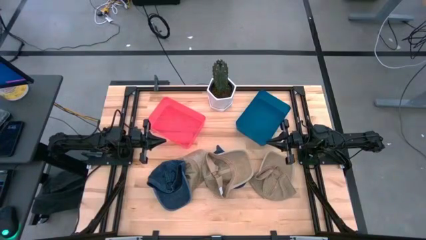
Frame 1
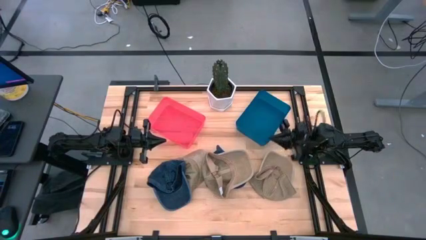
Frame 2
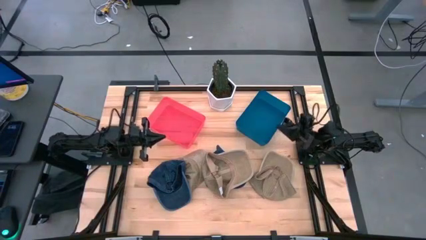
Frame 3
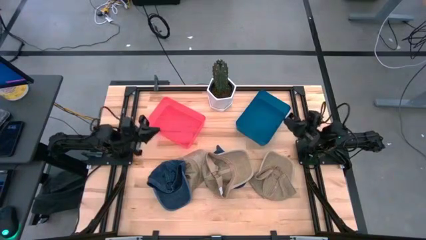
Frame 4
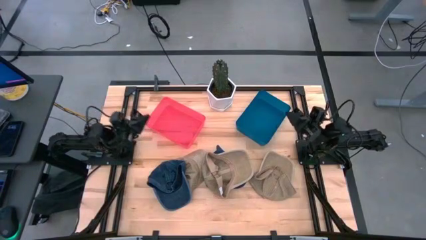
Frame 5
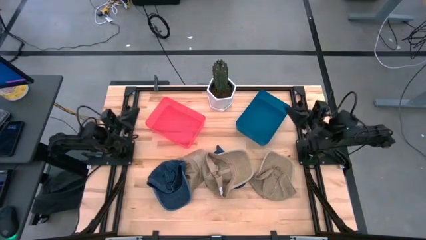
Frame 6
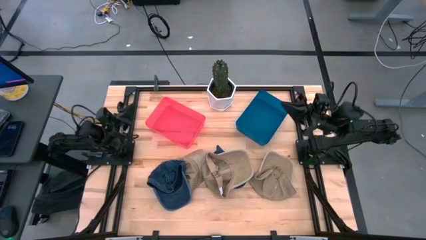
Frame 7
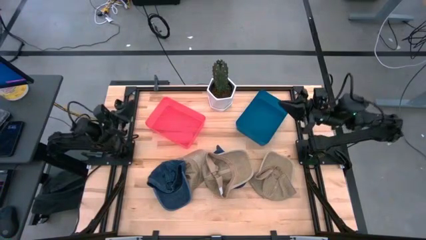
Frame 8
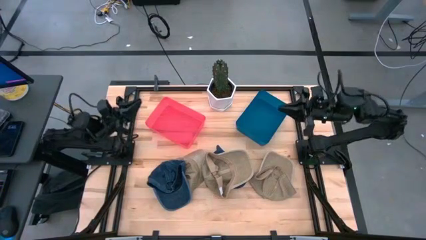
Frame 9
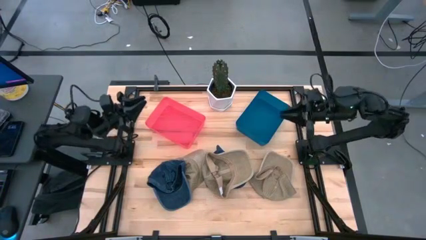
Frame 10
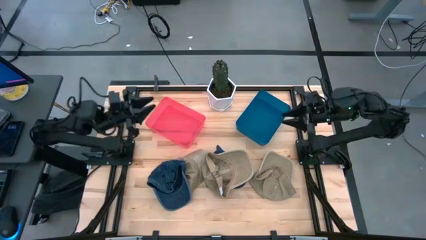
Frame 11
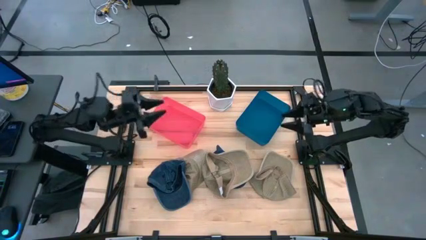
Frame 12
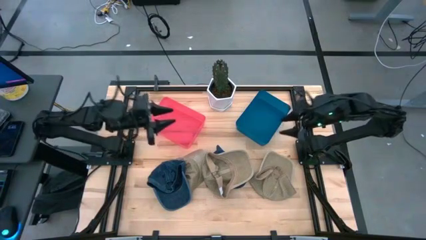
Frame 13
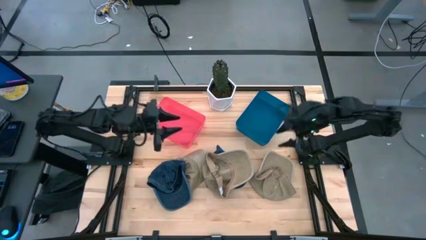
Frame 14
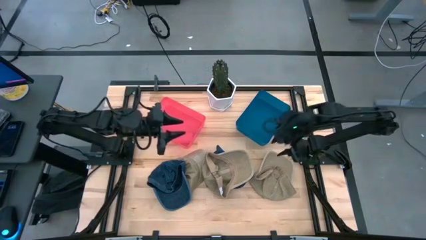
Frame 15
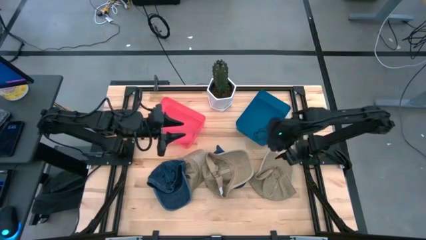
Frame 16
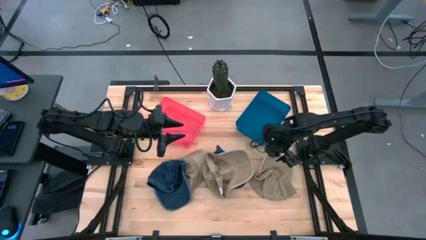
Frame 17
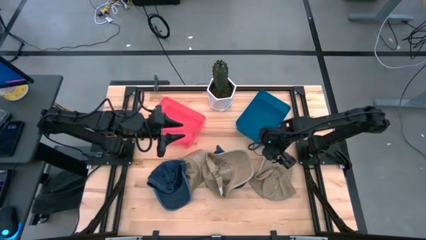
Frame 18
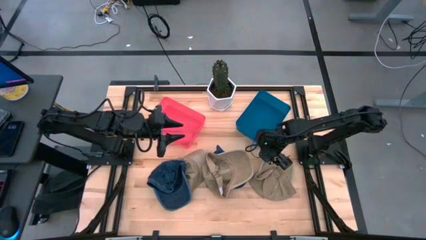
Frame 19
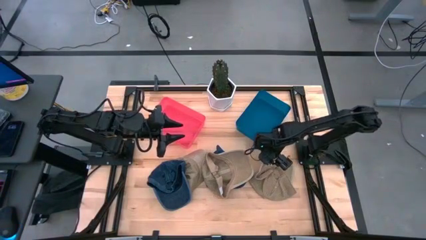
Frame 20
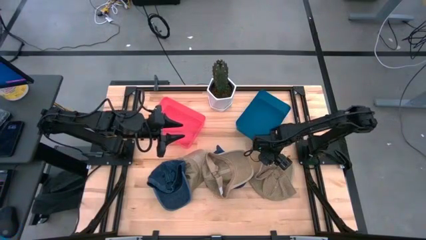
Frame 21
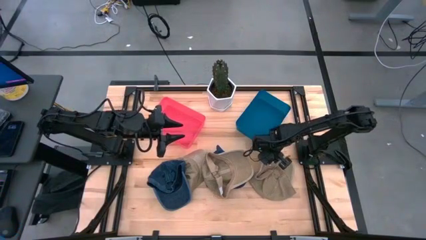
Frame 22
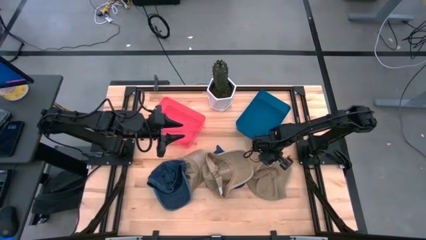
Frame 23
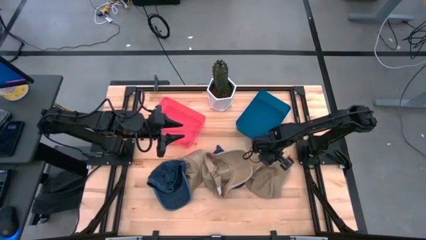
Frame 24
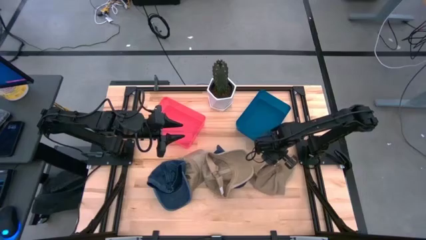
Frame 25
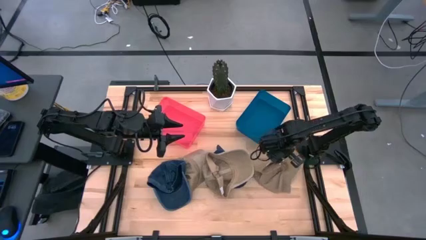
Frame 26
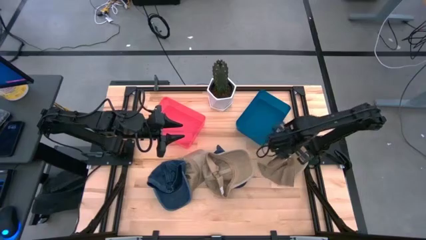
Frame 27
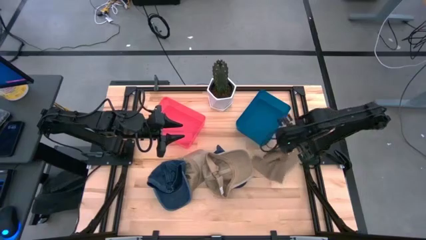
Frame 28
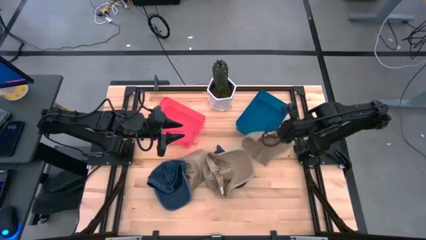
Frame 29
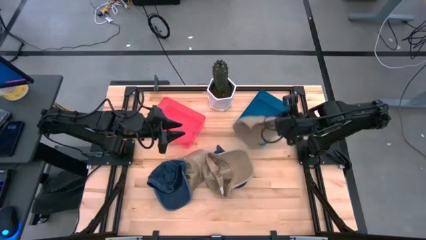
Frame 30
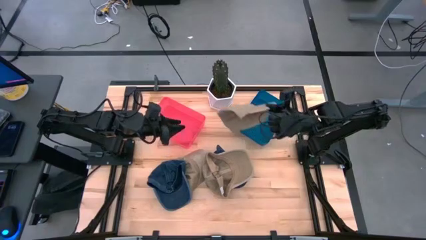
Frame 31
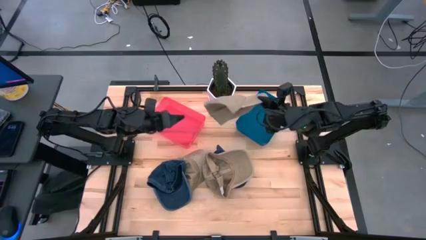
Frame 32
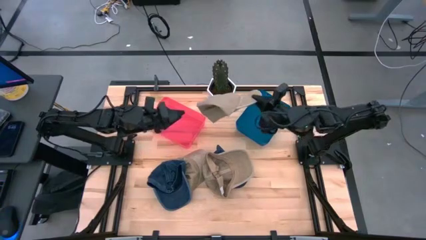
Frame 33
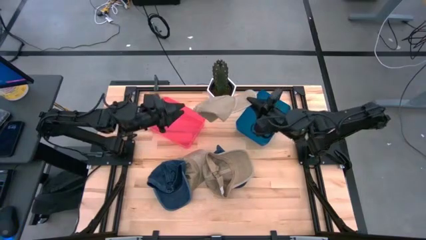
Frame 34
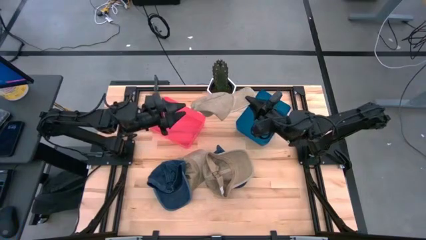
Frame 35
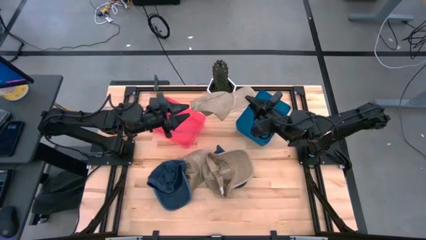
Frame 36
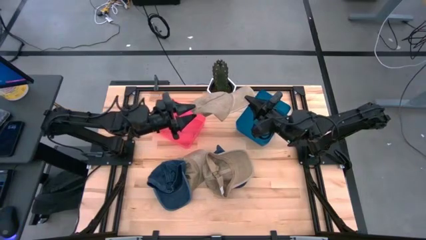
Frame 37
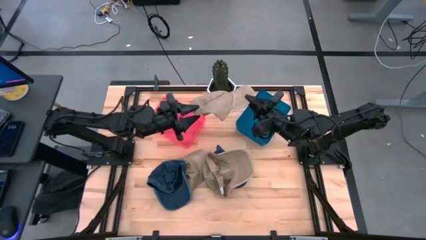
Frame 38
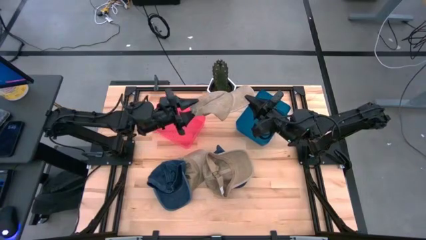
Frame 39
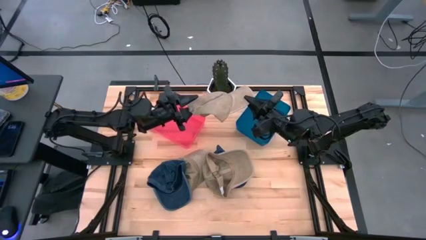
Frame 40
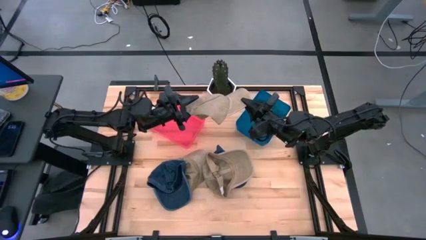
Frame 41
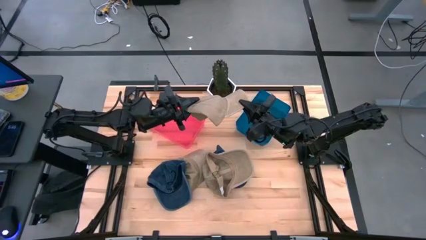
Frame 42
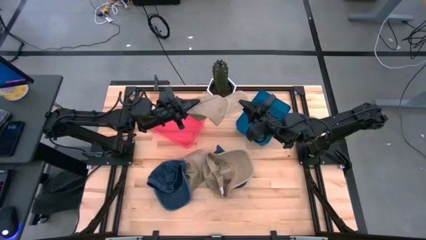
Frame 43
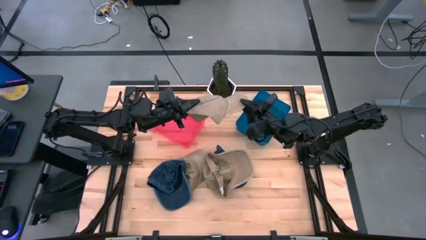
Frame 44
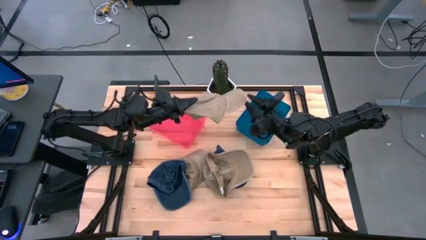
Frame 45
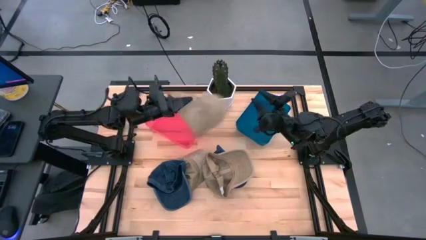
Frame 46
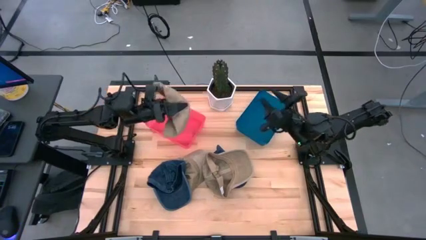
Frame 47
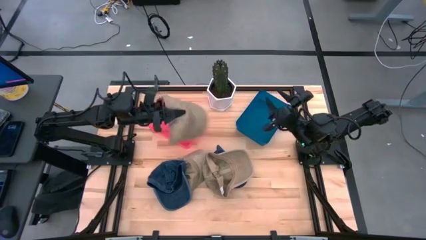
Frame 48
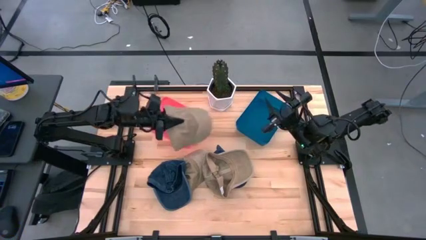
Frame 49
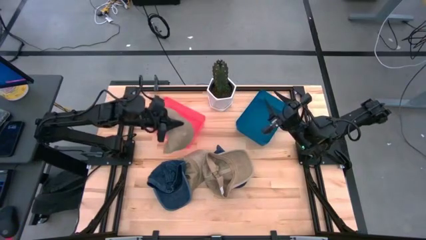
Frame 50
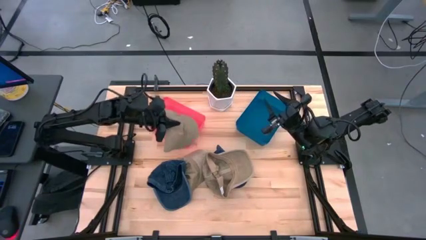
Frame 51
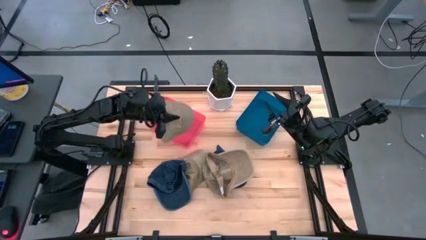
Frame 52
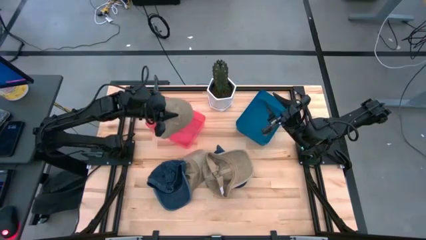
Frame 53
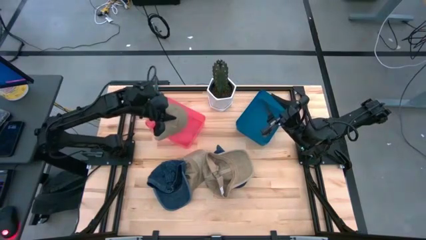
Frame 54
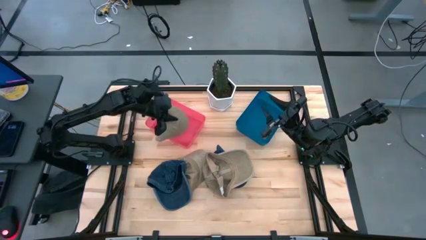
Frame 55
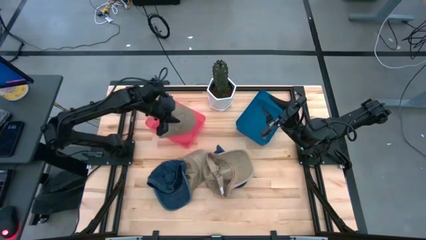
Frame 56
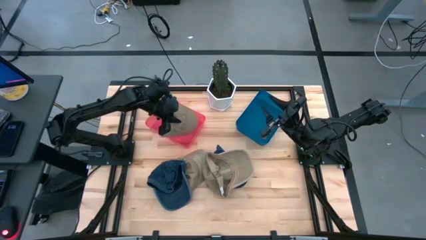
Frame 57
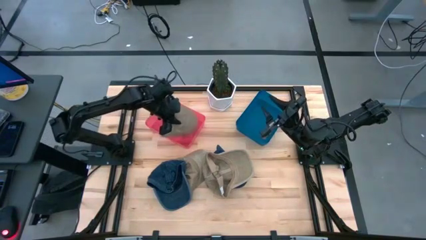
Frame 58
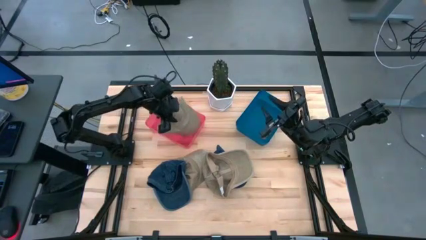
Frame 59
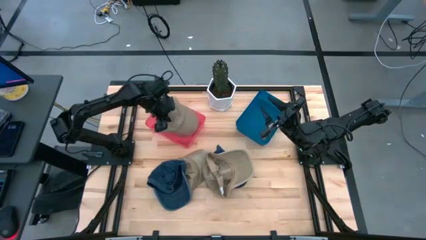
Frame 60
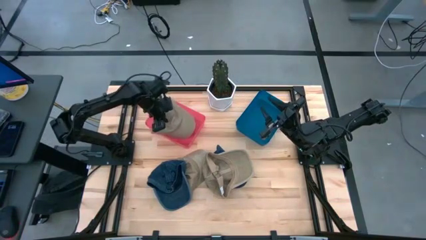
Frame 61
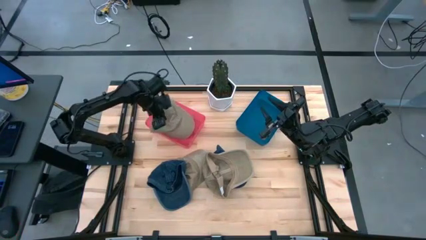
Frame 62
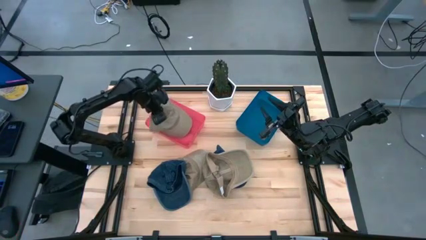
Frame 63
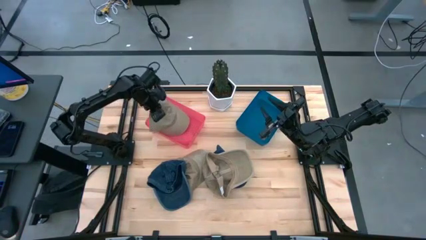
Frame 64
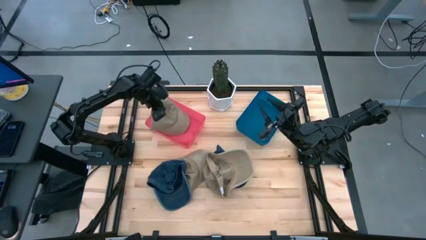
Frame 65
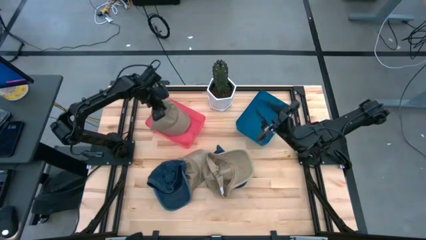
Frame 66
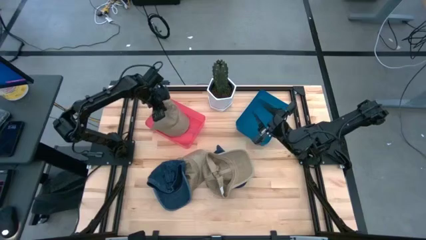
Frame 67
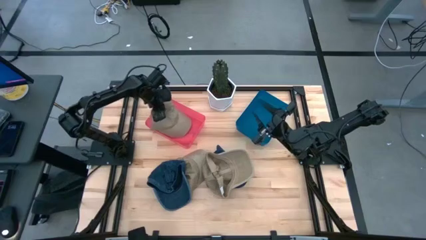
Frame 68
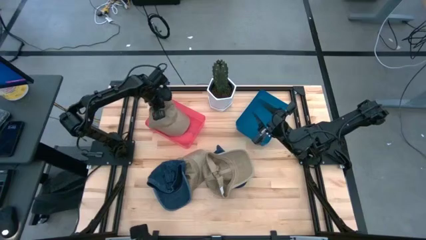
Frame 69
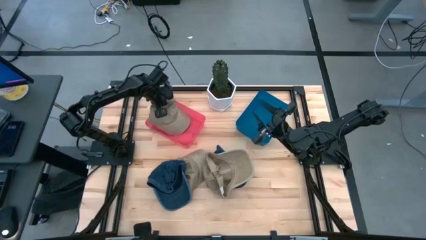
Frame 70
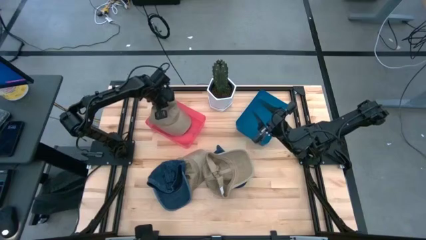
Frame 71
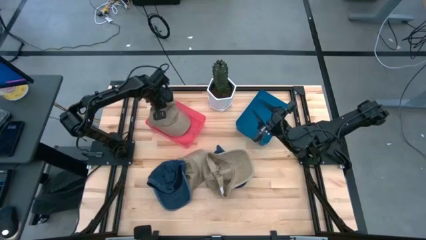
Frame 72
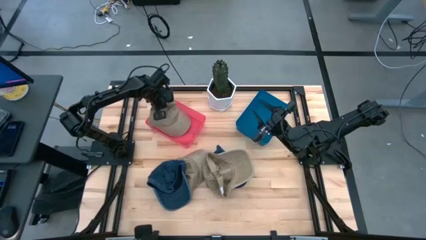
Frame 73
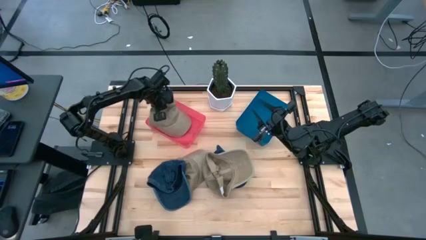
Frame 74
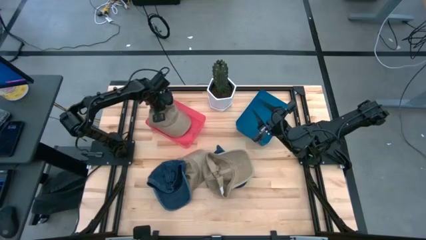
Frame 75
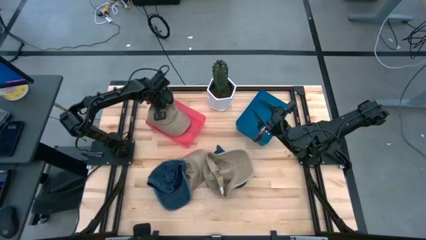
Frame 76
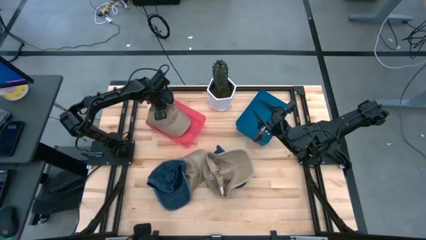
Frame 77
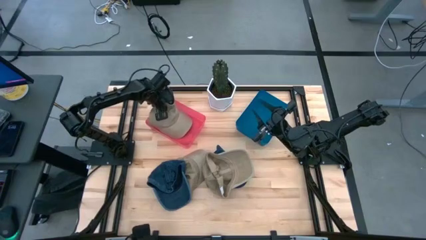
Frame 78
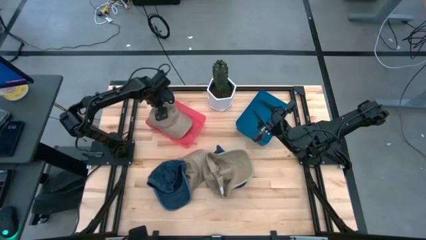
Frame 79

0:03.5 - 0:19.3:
Task: Pick & Place hat
Put the right brown cap into the red bin
